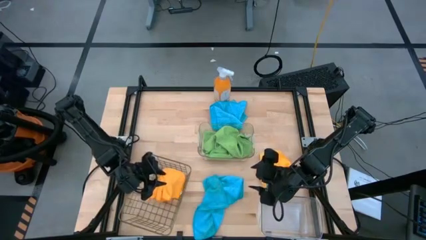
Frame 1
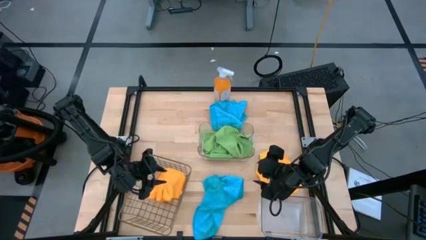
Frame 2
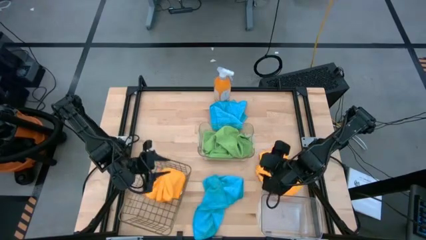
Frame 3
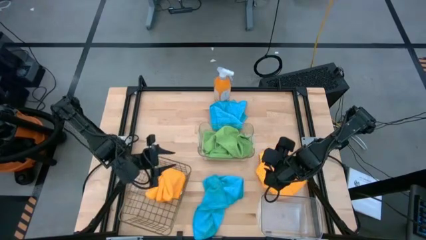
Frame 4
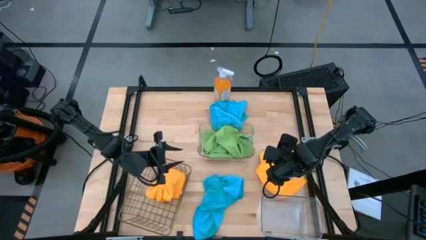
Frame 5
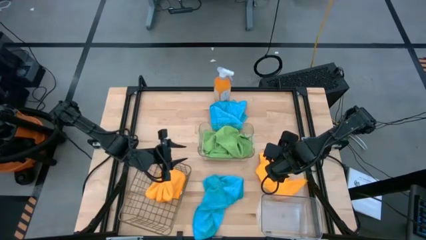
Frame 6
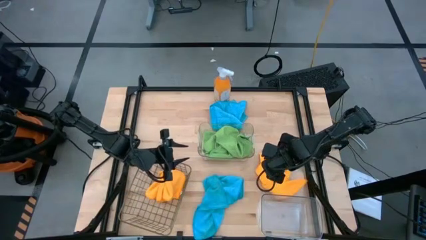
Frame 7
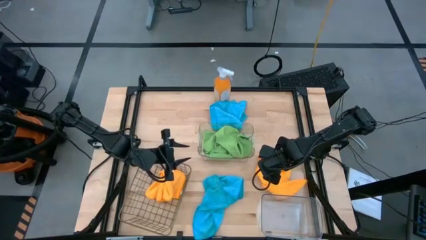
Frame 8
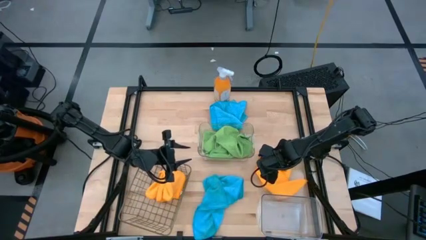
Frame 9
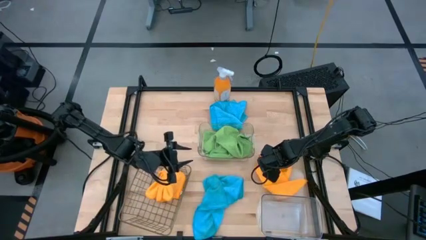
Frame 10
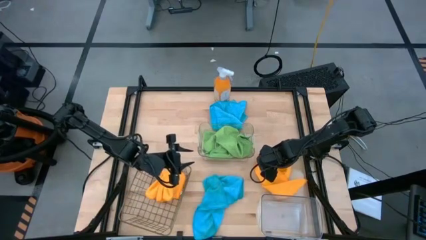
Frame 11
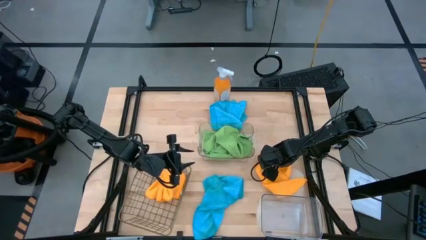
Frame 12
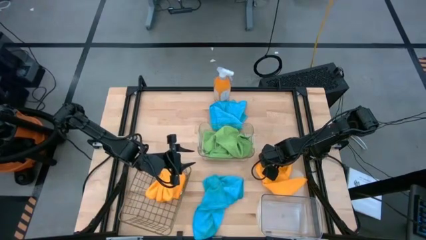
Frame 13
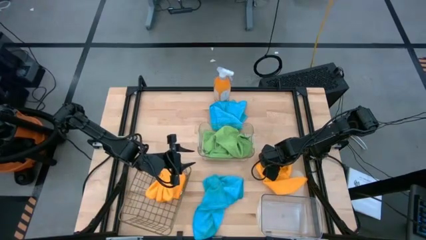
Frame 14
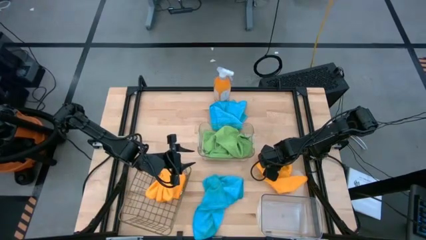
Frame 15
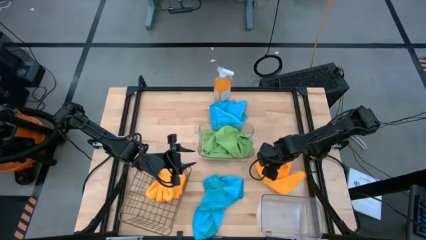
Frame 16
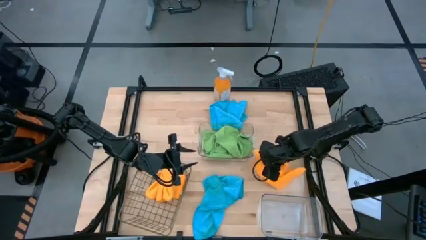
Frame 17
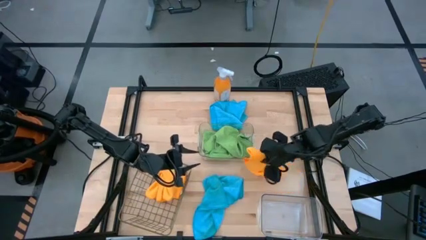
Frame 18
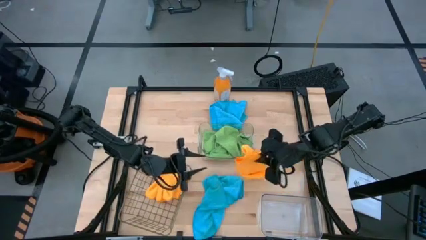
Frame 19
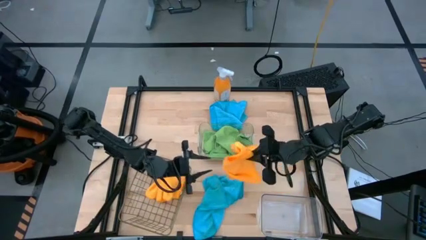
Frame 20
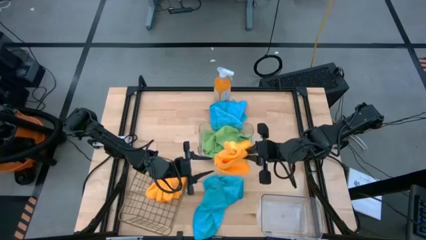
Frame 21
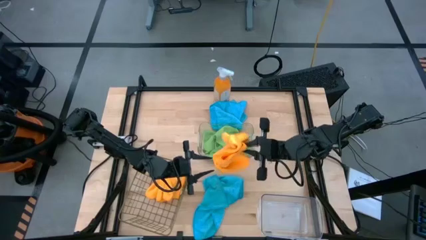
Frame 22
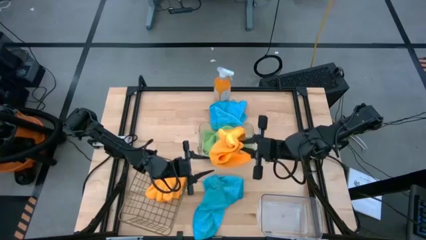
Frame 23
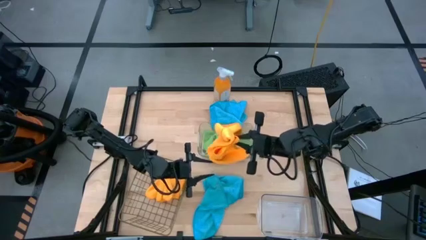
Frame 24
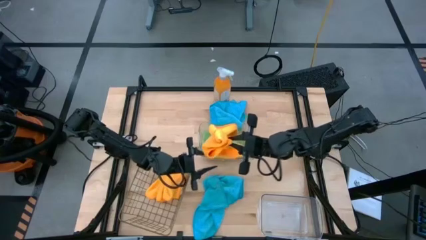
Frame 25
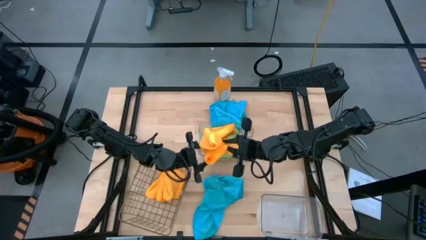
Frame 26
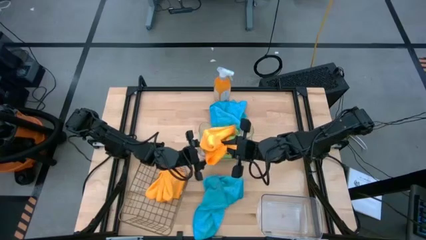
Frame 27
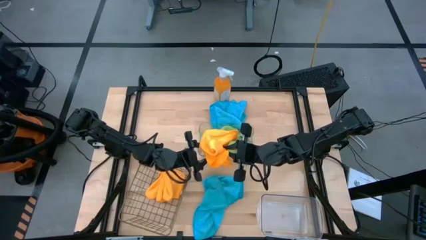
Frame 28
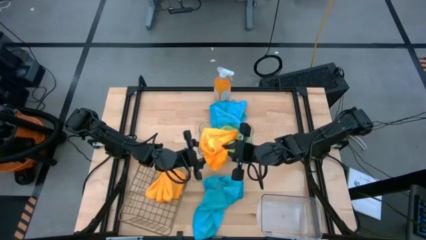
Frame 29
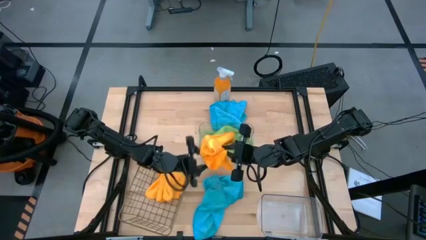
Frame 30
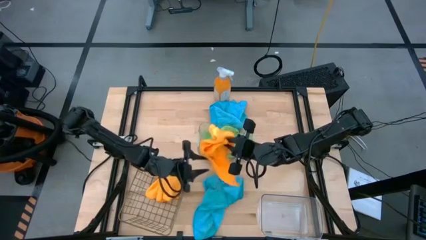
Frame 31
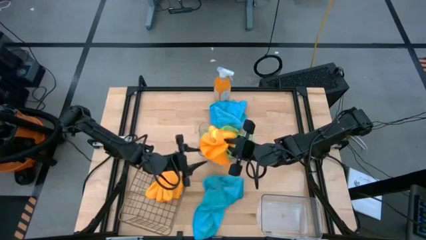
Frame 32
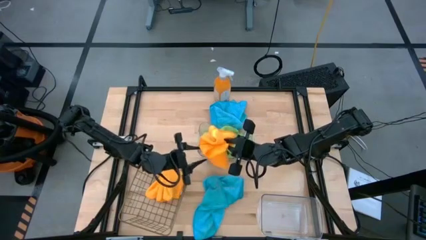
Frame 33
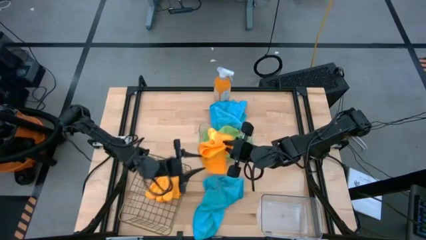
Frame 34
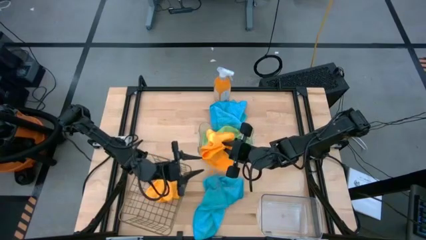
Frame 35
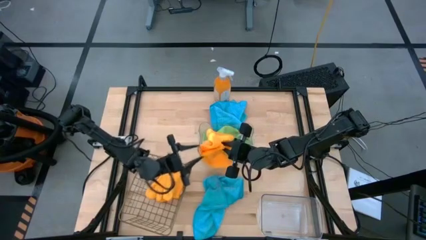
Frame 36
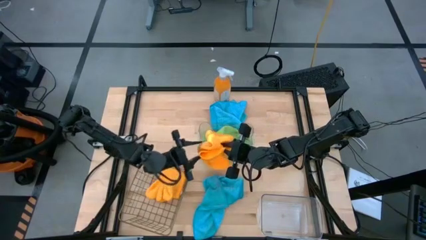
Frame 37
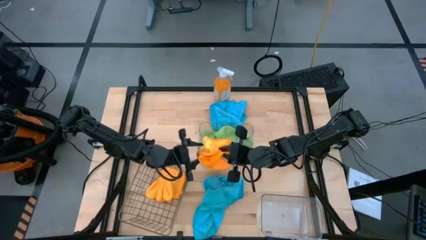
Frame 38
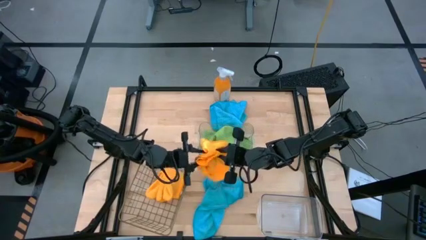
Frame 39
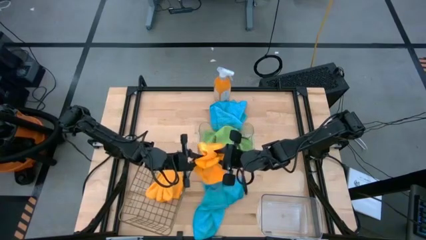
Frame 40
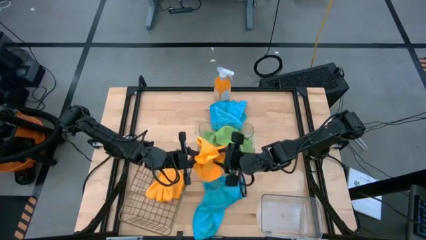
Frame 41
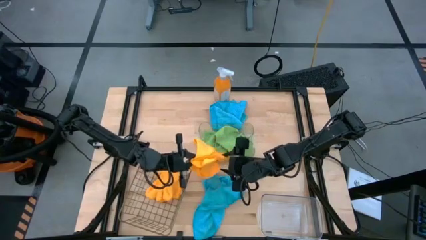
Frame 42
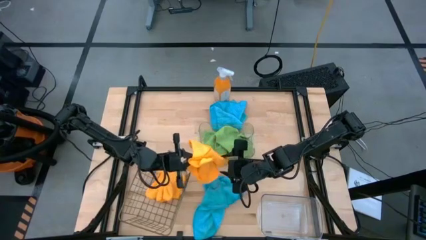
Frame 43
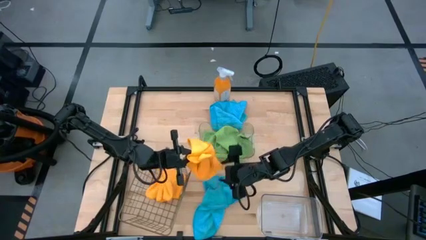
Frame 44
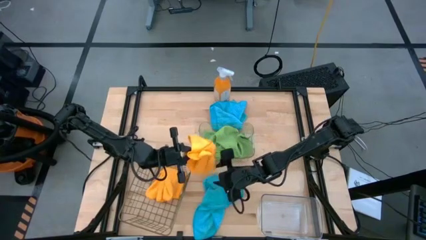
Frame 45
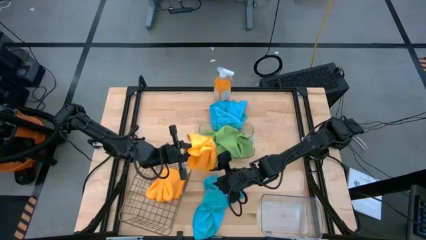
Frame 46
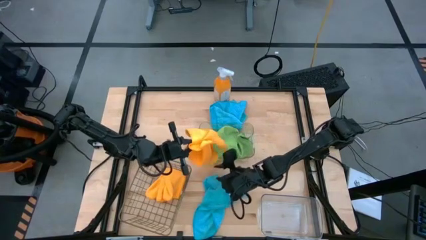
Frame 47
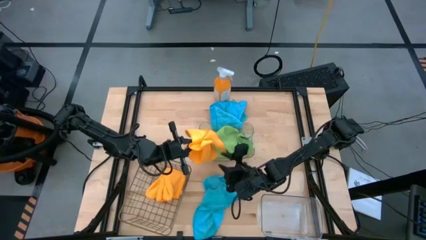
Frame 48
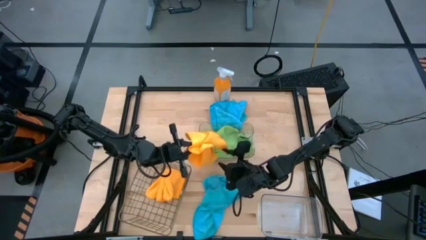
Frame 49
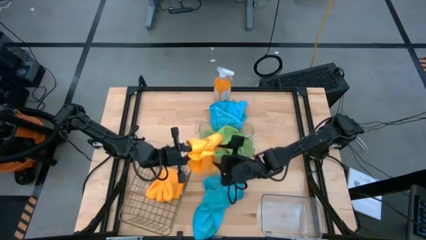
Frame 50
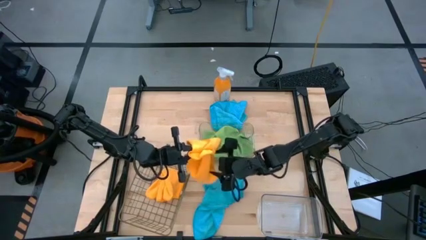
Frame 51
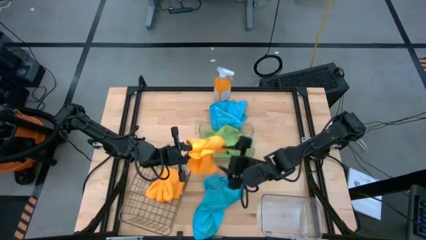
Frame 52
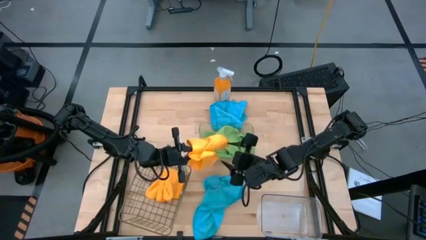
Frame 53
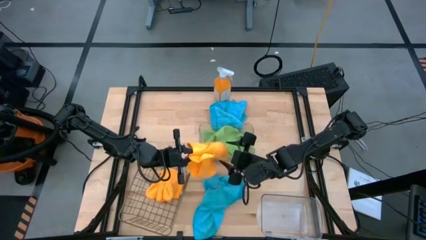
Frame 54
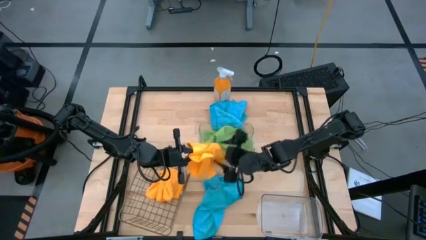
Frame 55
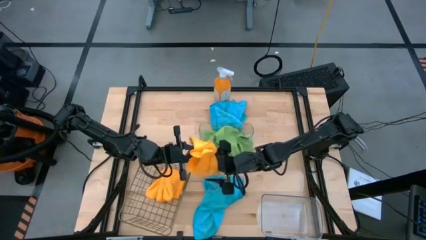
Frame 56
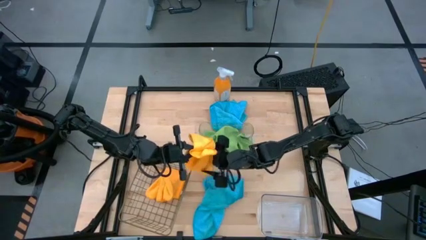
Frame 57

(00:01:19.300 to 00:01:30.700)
Task: Sort microfiber towel by color & place in baskets
Put the yellow towel into the mesh basket

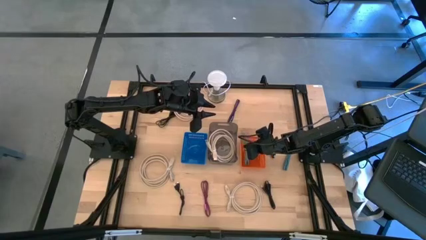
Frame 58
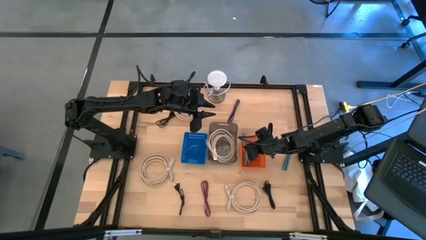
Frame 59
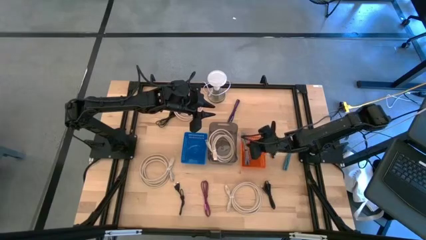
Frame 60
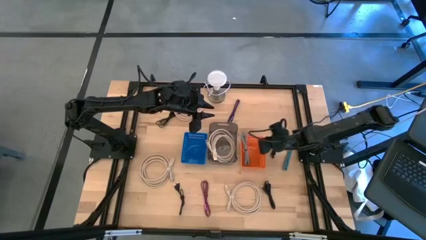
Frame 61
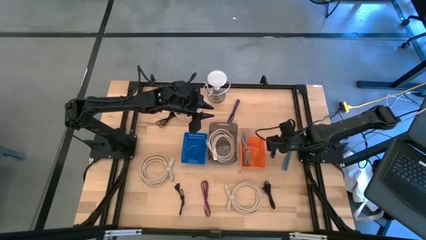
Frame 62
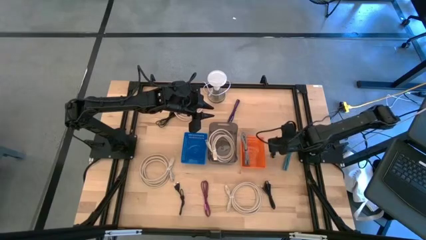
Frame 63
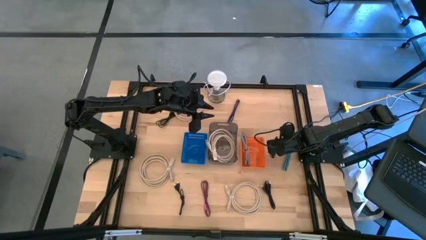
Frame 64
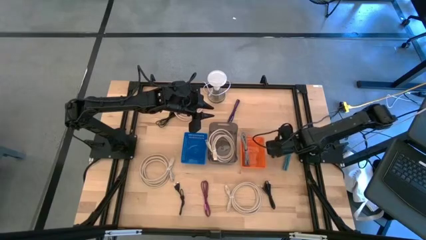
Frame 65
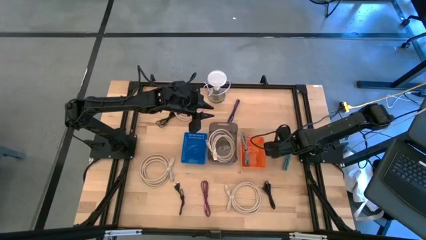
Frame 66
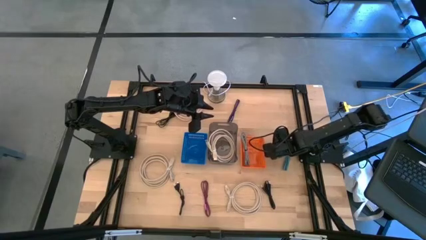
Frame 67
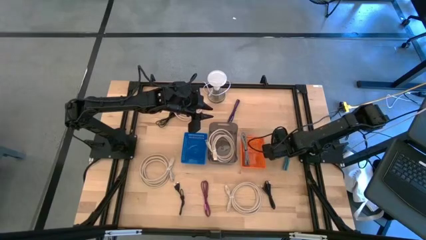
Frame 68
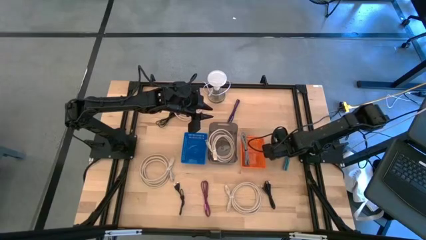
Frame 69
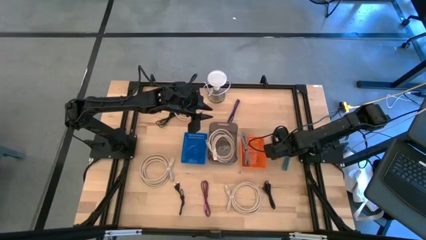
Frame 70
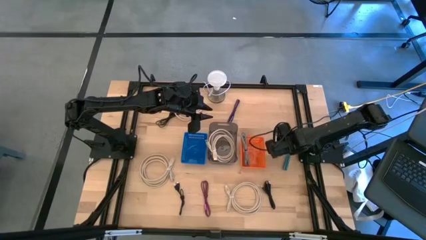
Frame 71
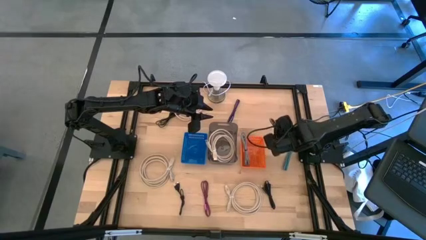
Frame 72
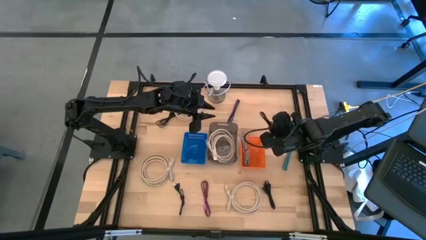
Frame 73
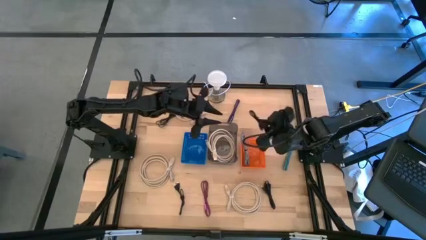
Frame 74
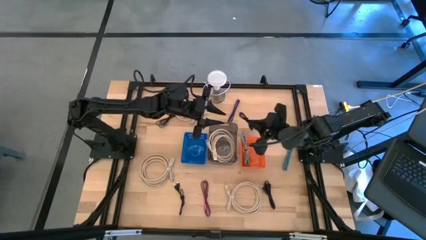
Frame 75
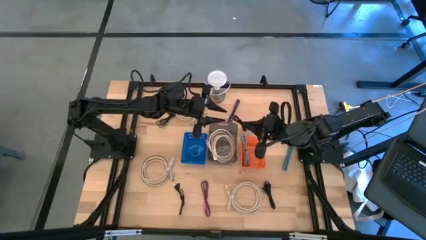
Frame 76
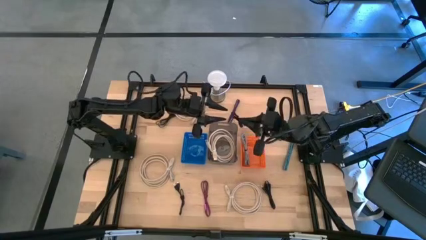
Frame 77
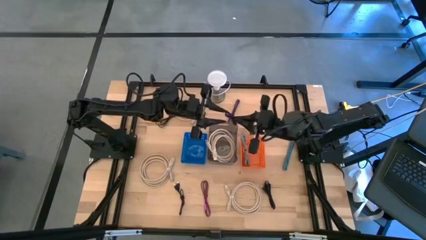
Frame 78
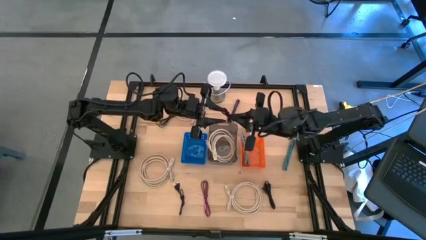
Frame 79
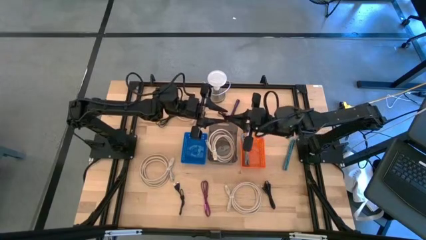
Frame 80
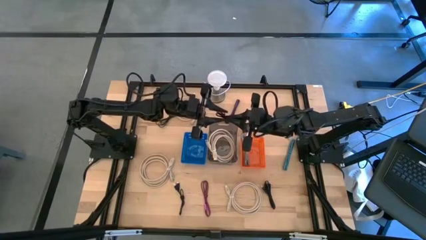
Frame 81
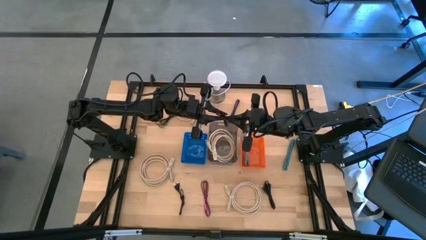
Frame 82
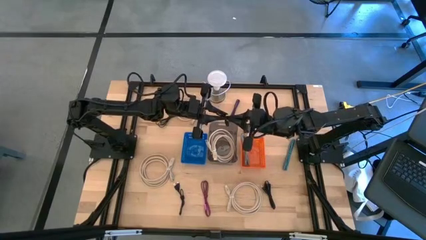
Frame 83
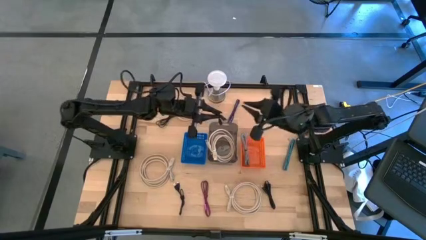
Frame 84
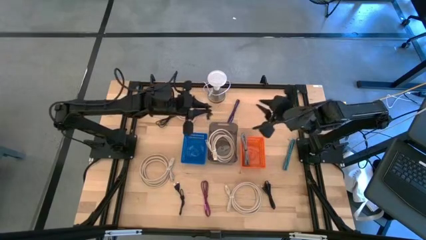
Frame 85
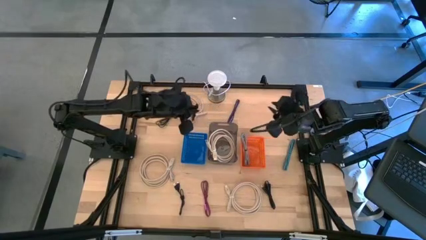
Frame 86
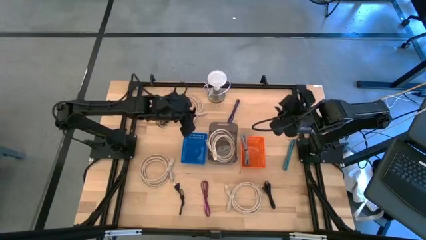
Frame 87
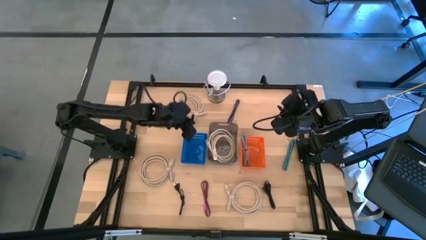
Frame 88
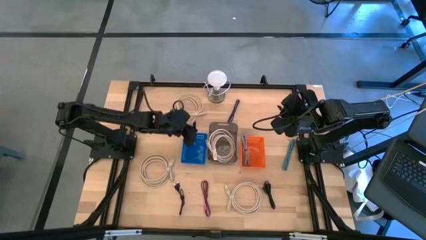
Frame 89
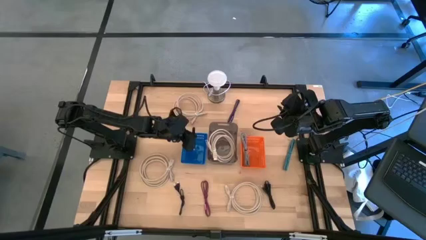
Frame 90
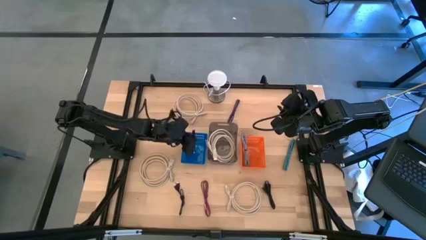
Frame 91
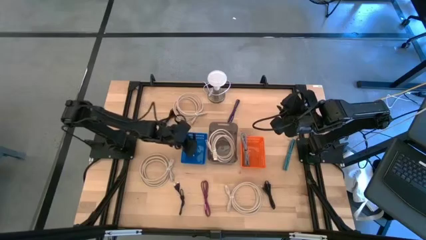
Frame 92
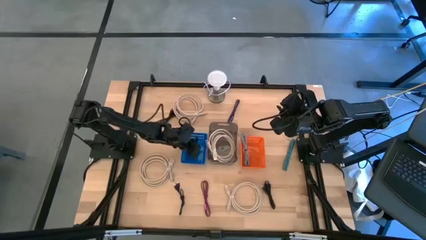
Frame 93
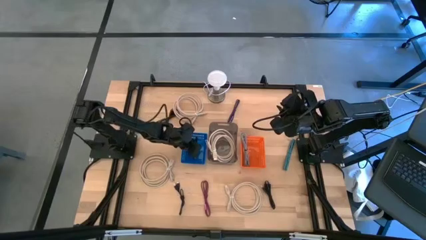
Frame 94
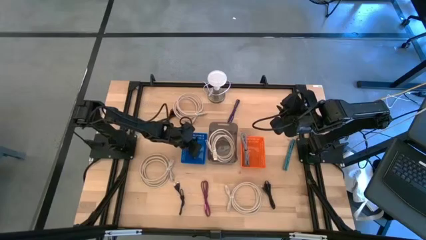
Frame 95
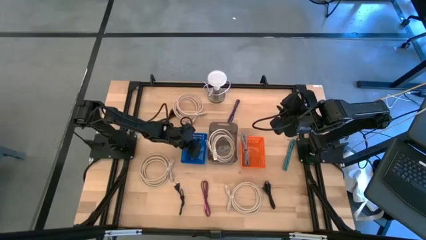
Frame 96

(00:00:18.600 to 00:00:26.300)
Task: Pick & Place USB Port
Put the black charger cable into the blue bin
